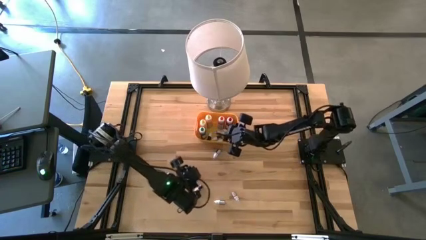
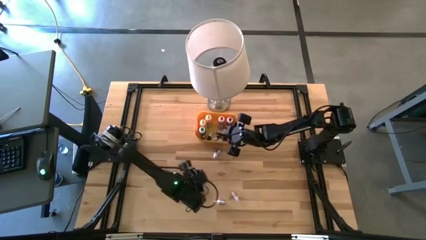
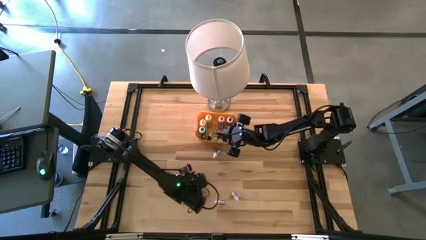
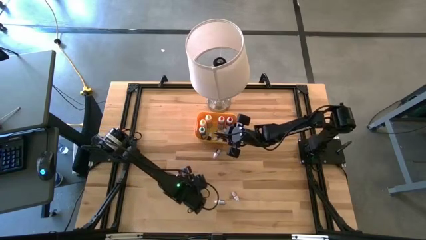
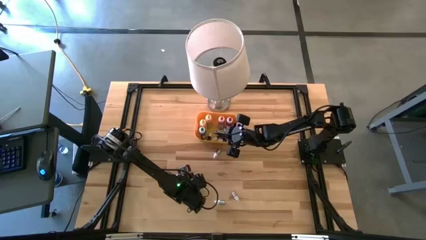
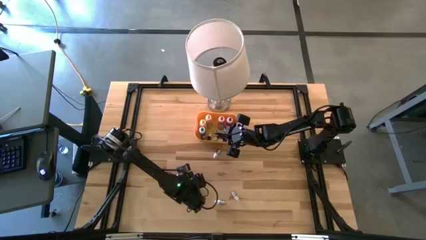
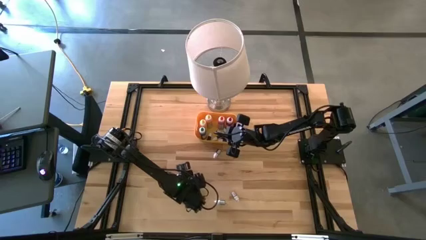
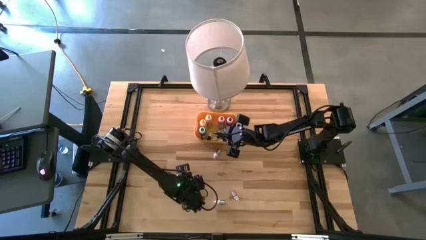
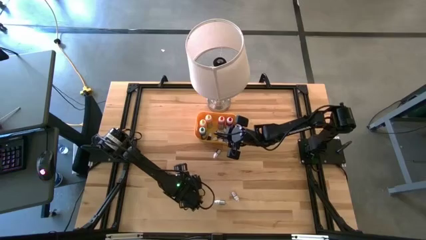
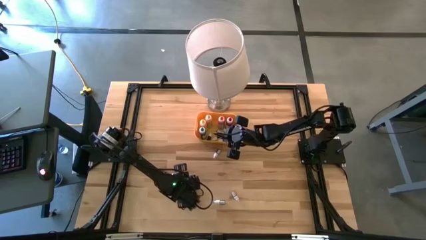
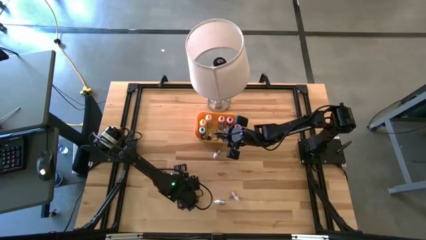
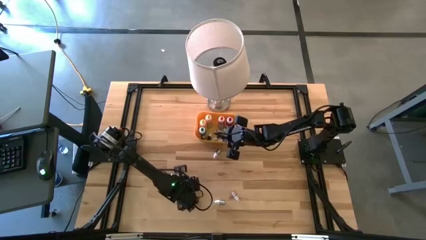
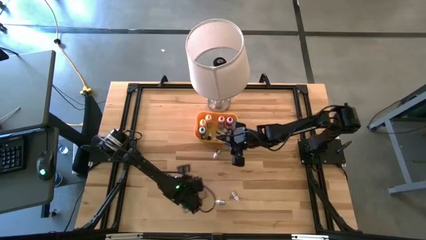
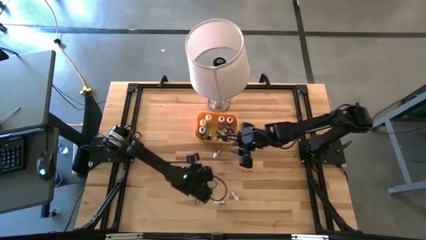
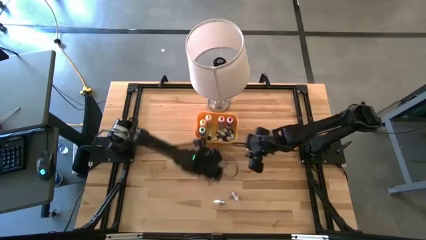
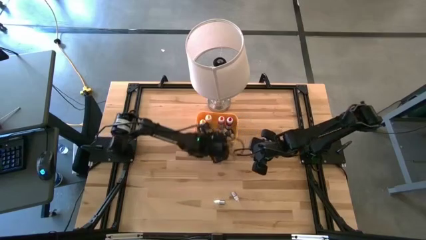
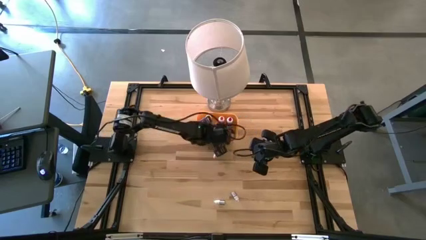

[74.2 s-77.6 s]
Task: Pick & Place food coloring
Put the blue food coloring bottle into the yellow bin

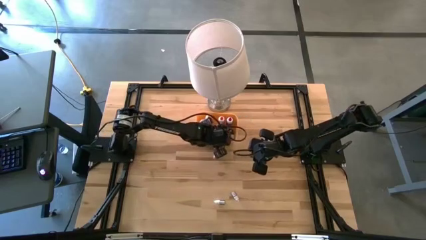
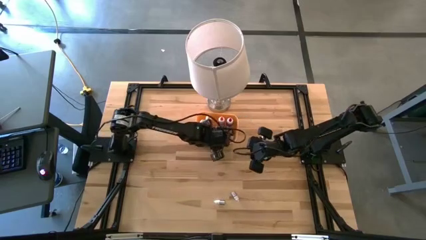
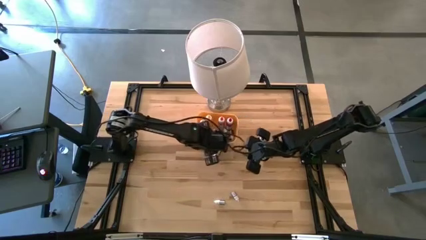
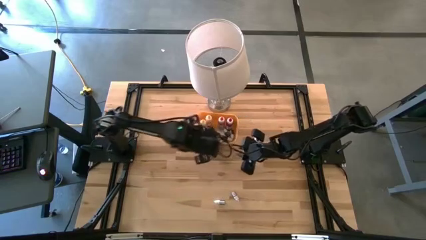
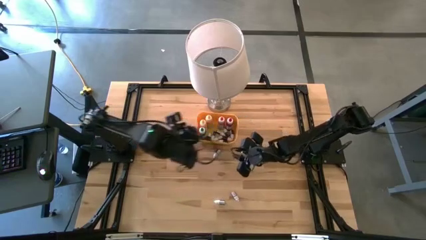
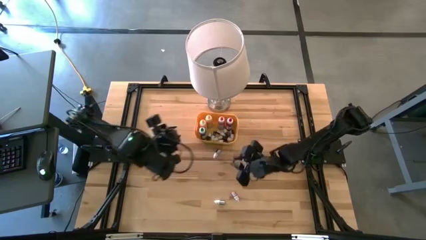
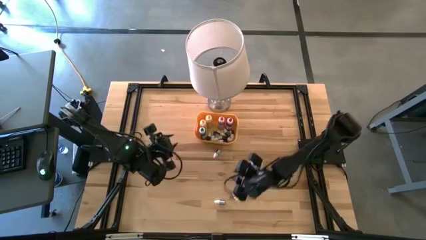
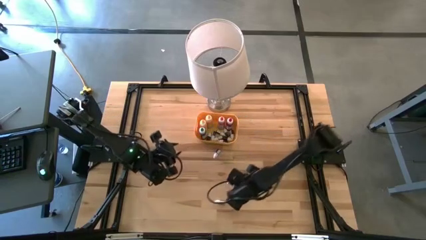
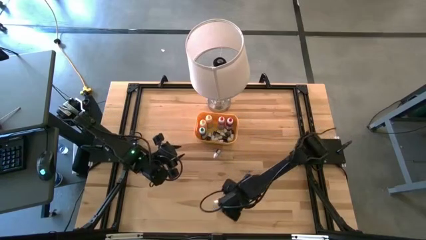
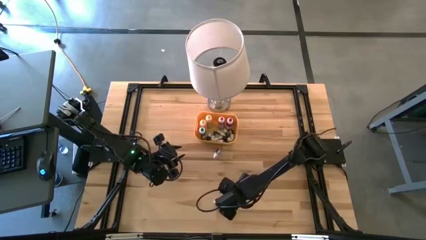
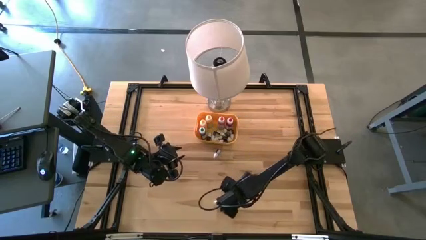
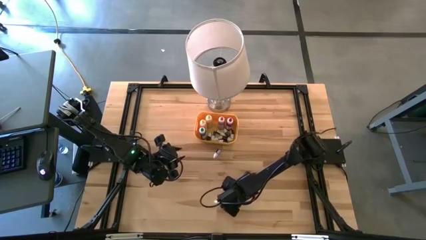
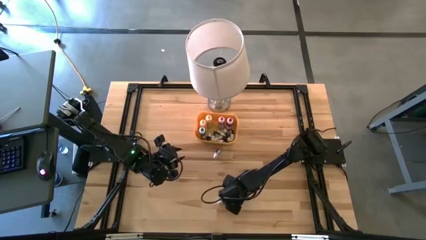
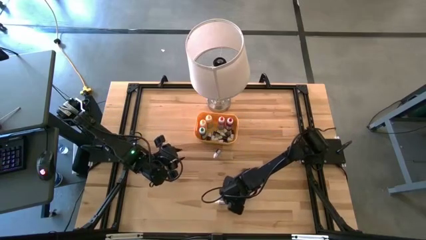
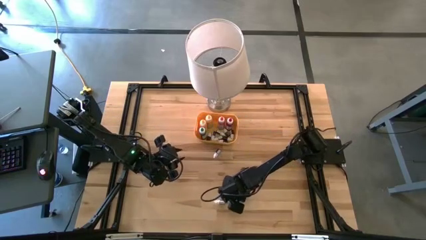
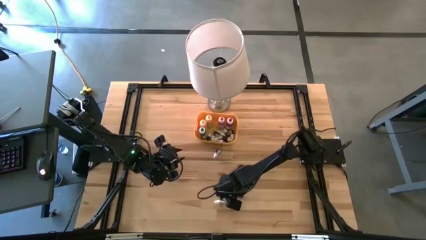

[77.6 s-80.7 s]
Put the orange food coloring bottle into the yellow bin

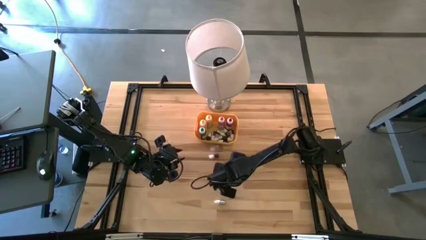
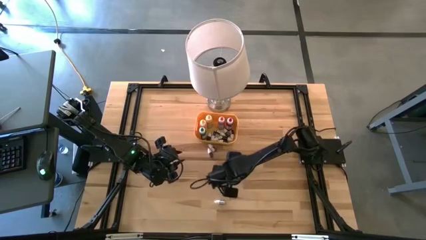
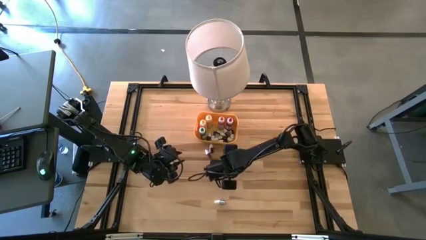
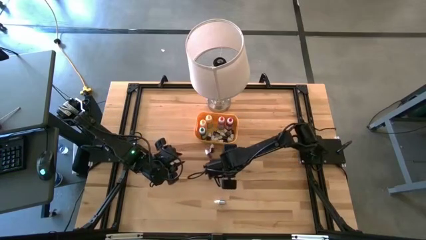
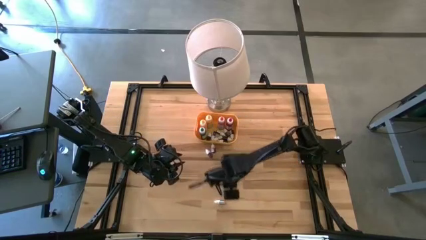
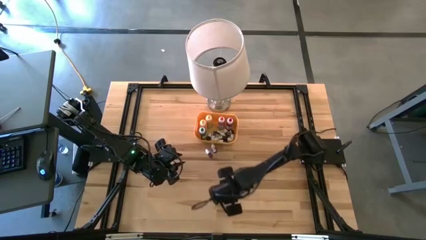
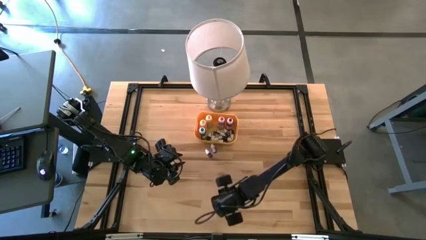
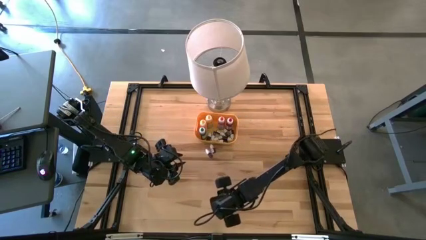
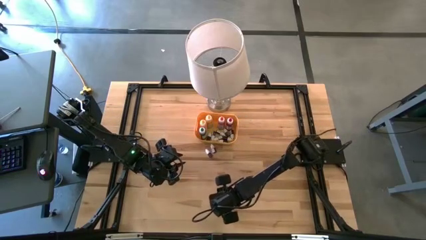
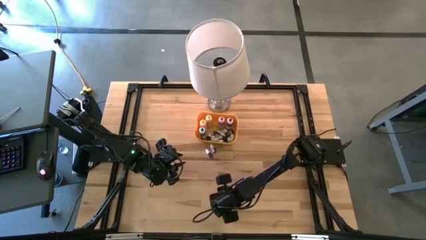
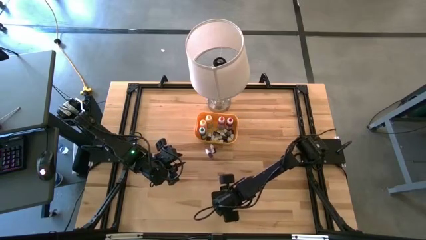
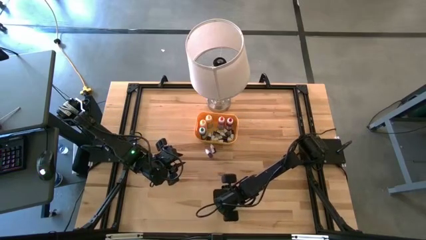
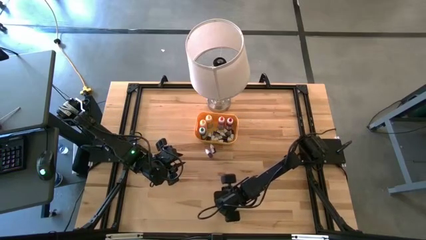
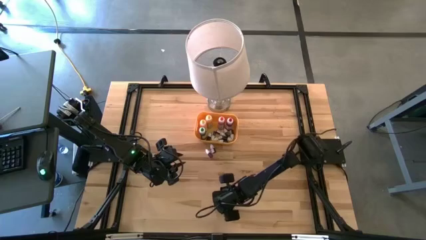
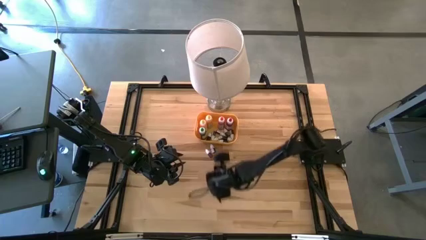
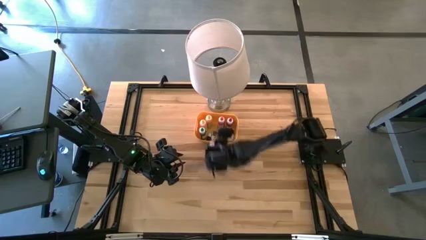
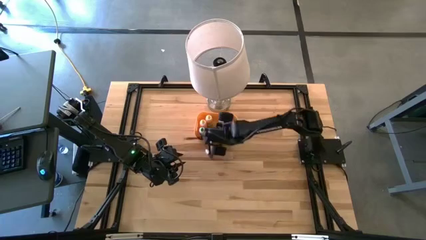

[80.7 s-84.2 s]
Put the pink food coloring bottle into the yellow bin

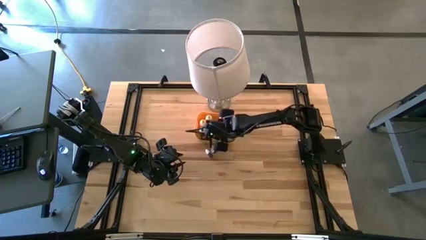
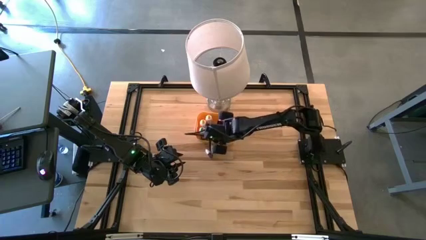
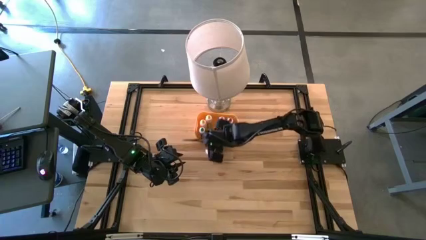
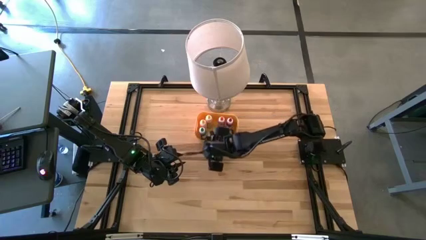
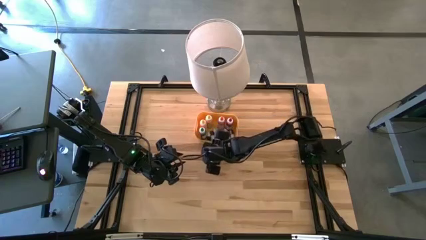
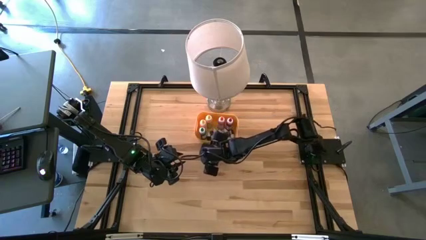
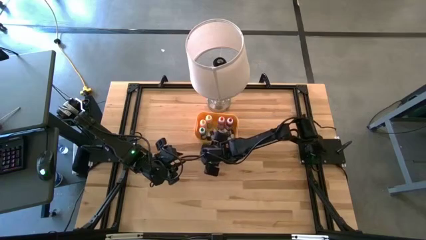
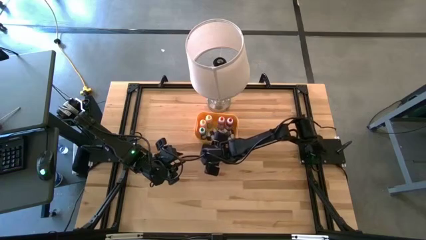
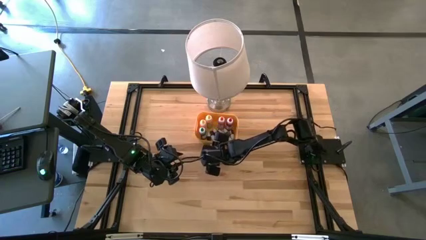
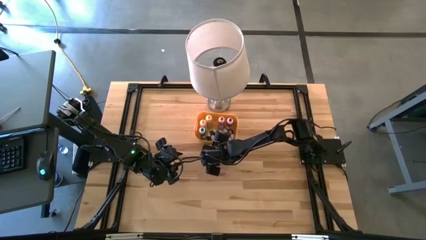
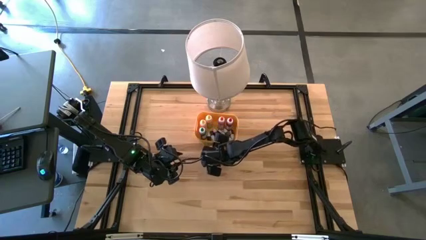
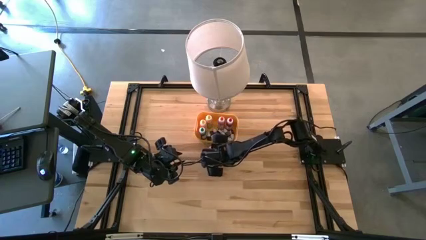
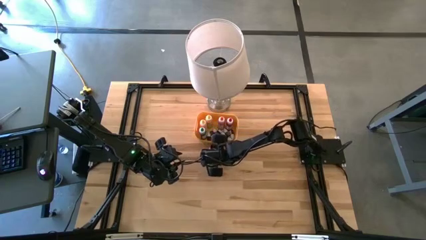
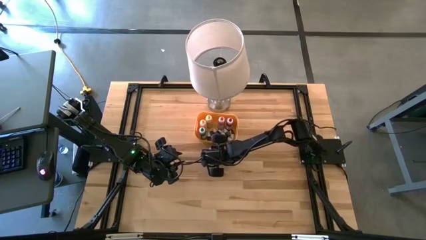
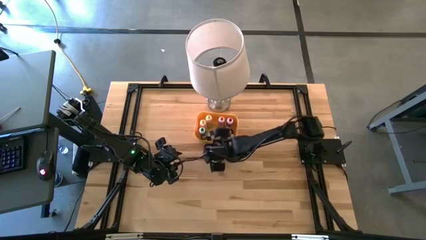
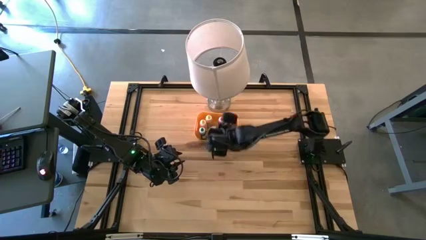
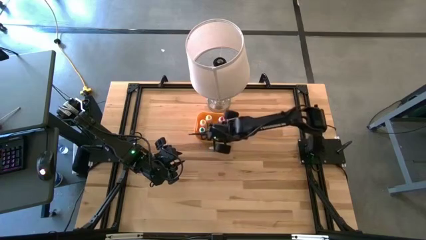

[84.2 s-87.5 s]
Put the pink food coloring bottle into the yellow bin

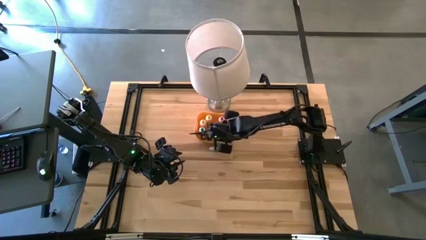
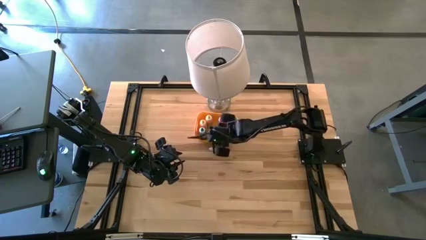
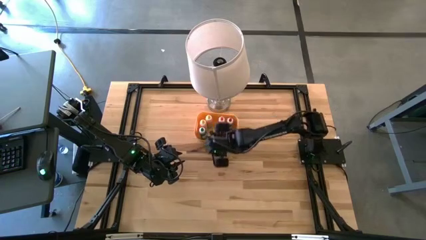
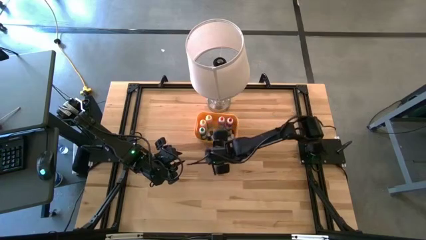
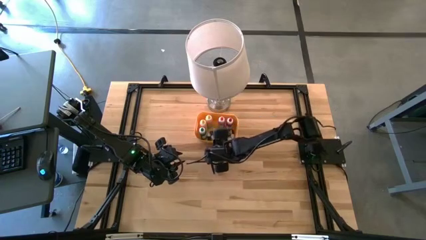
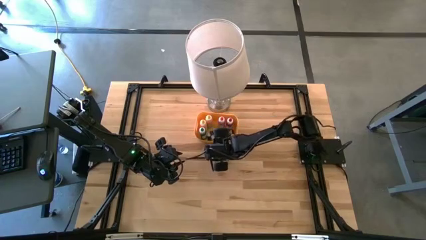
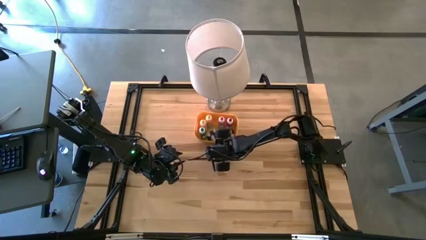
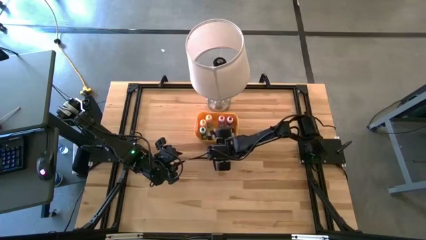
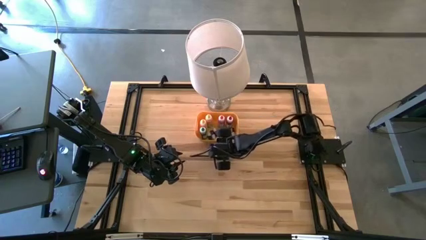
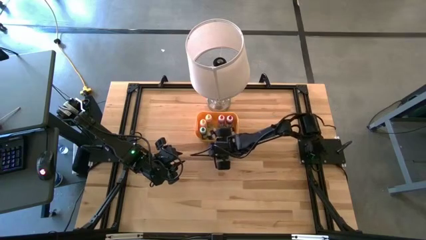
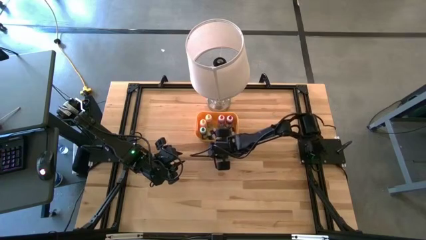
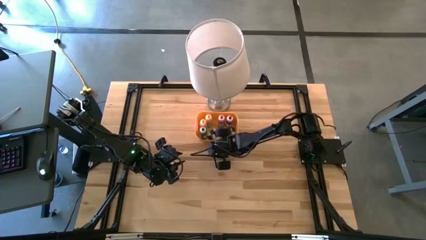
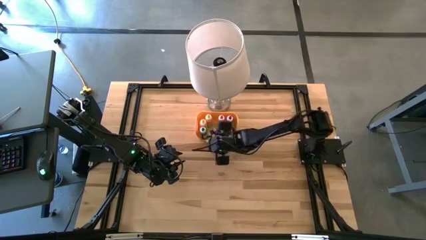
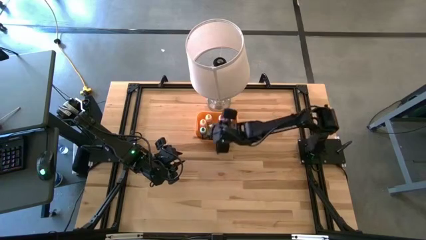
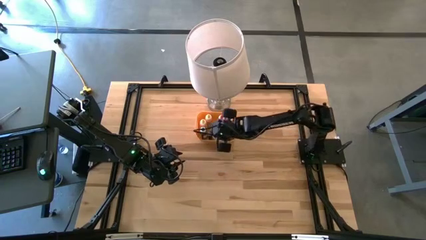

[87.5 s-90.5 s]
Put the blue food coloring bottle into the yellow bin
